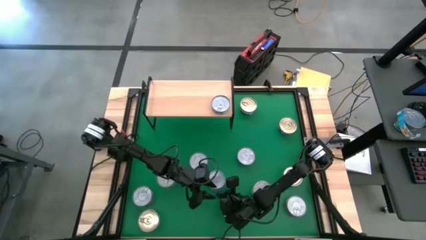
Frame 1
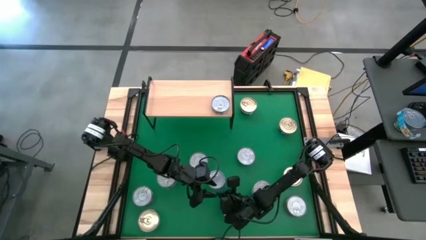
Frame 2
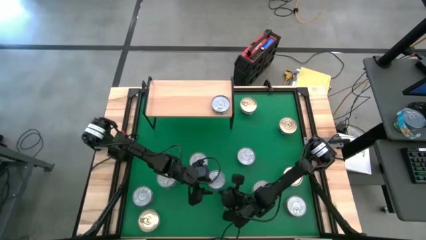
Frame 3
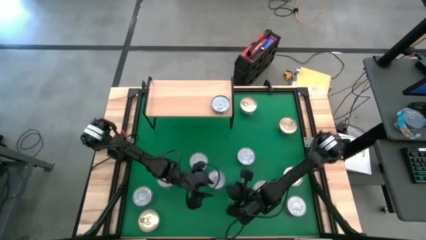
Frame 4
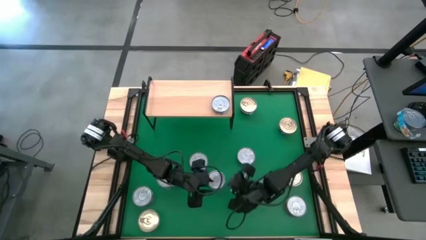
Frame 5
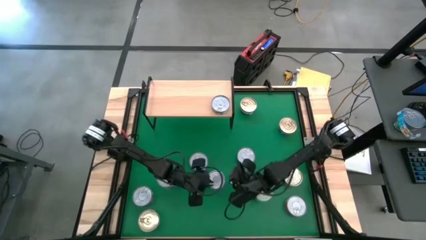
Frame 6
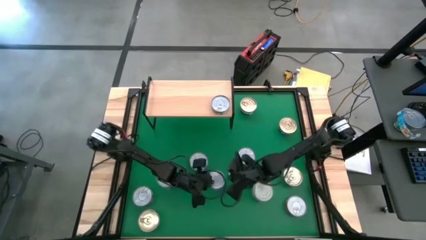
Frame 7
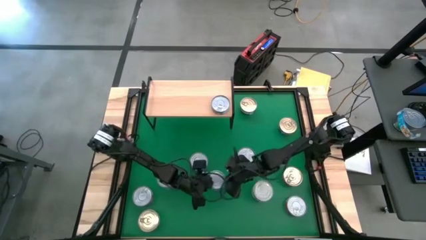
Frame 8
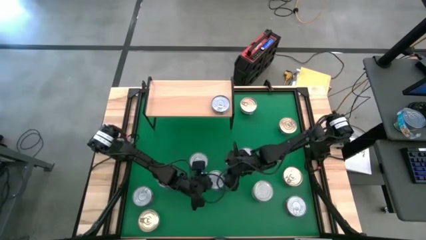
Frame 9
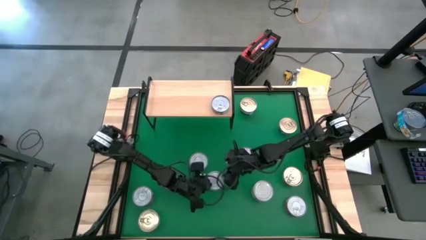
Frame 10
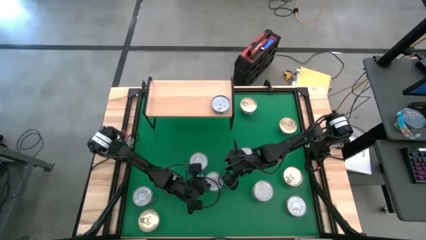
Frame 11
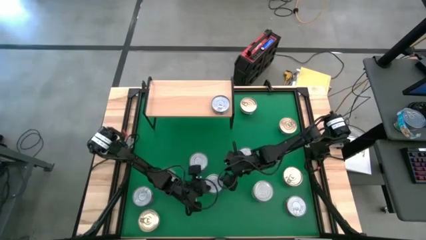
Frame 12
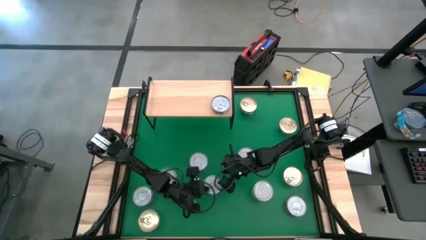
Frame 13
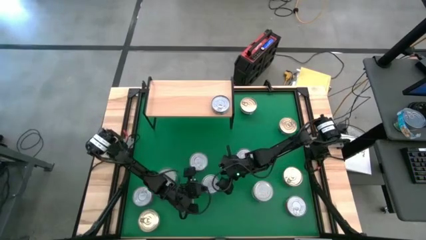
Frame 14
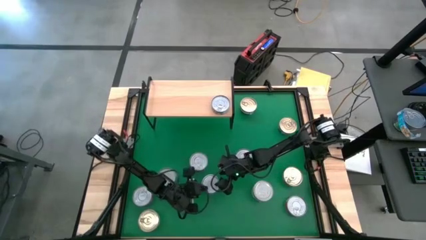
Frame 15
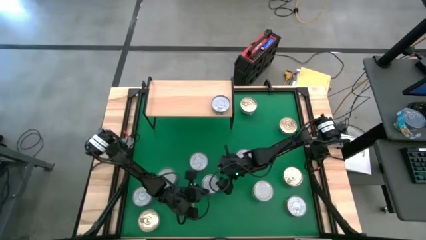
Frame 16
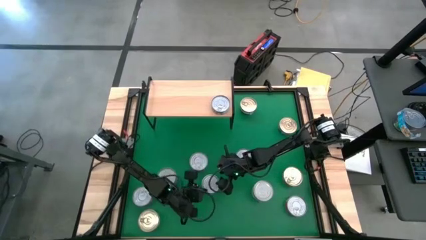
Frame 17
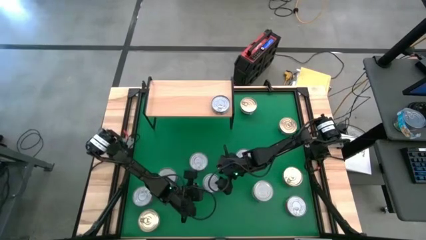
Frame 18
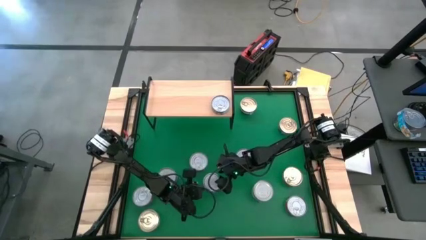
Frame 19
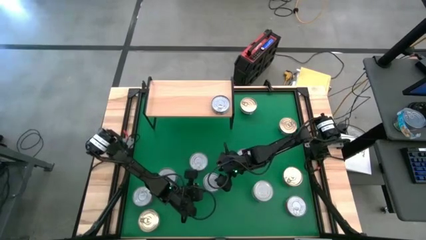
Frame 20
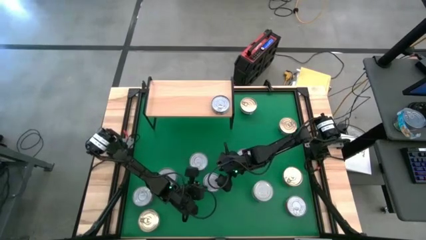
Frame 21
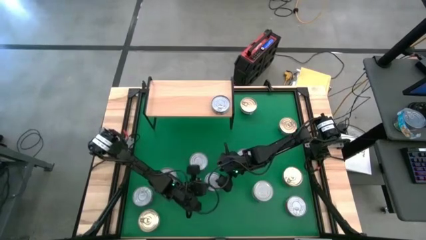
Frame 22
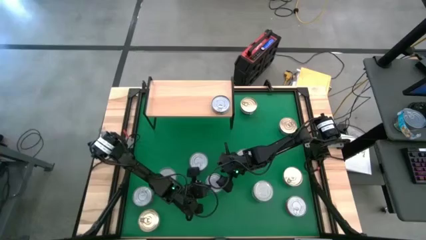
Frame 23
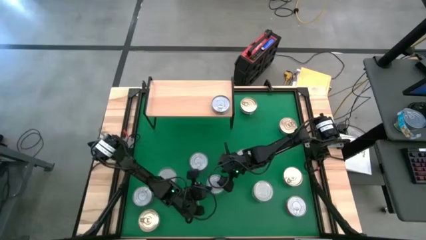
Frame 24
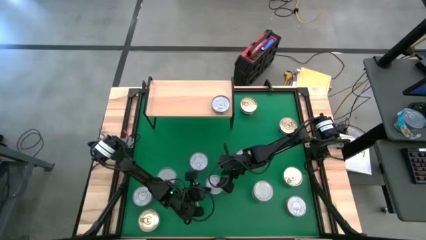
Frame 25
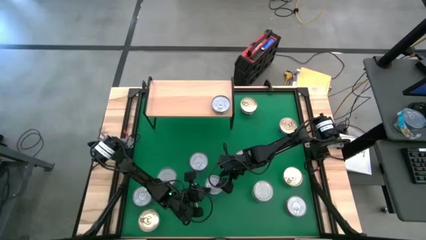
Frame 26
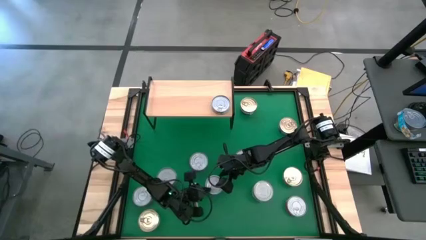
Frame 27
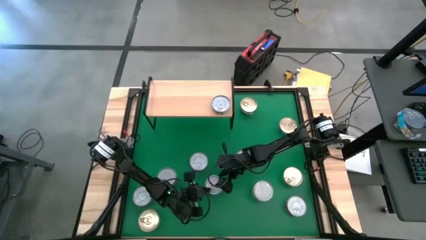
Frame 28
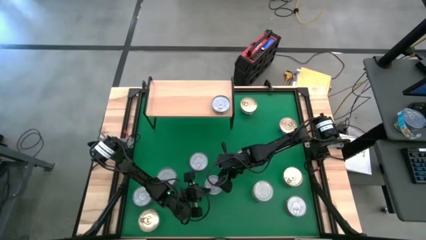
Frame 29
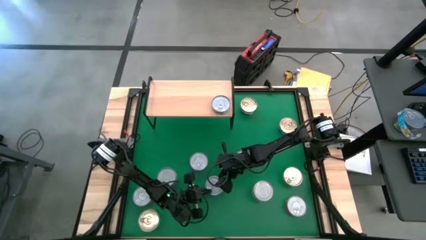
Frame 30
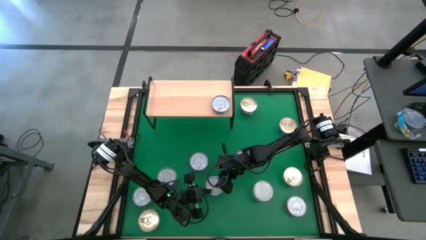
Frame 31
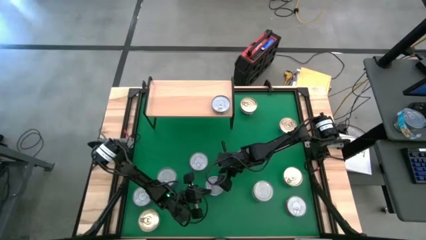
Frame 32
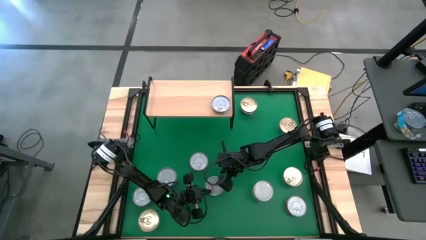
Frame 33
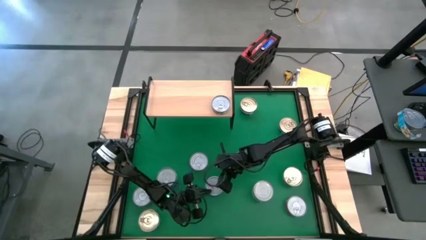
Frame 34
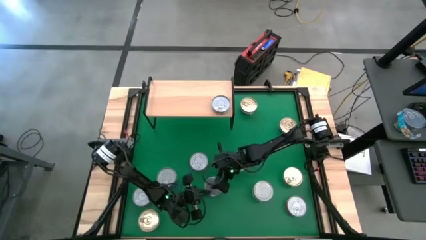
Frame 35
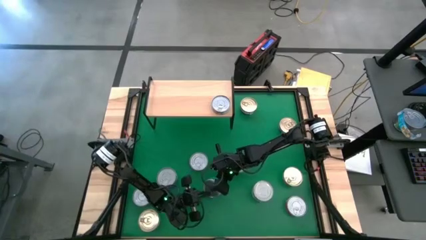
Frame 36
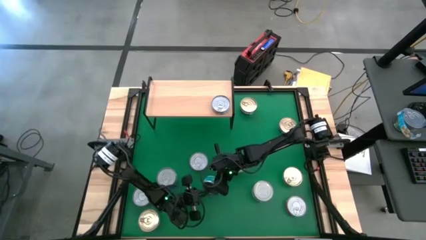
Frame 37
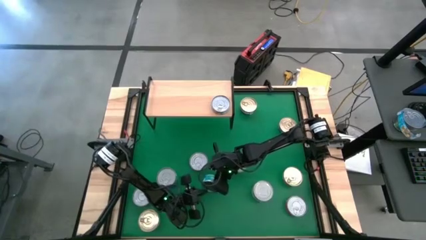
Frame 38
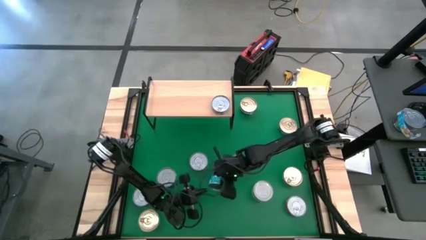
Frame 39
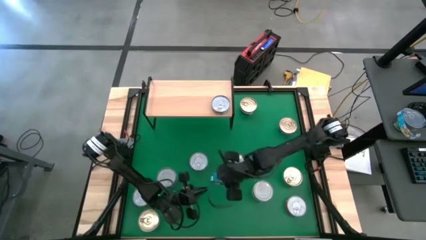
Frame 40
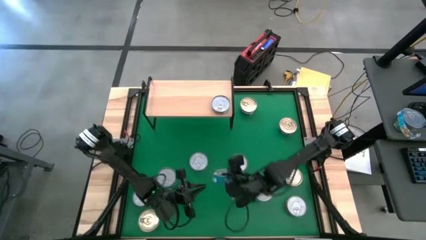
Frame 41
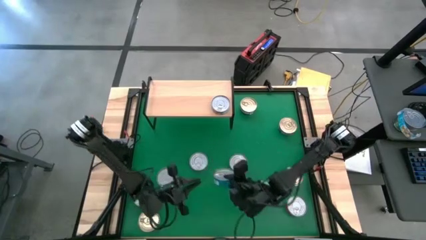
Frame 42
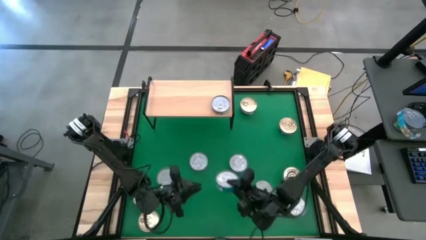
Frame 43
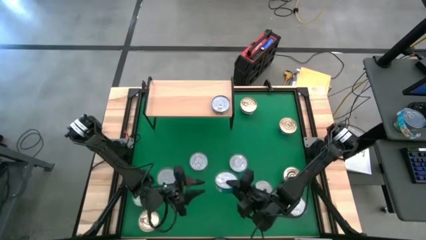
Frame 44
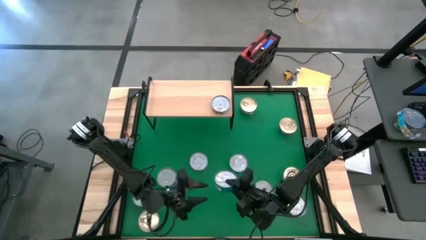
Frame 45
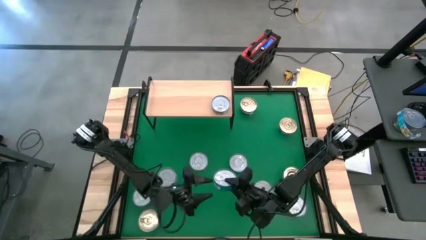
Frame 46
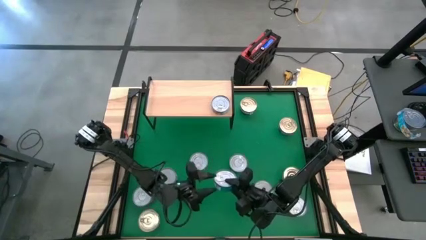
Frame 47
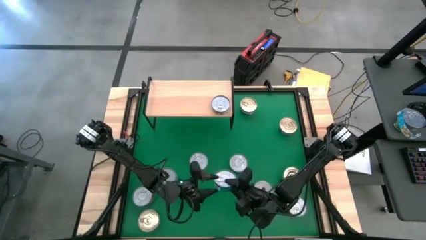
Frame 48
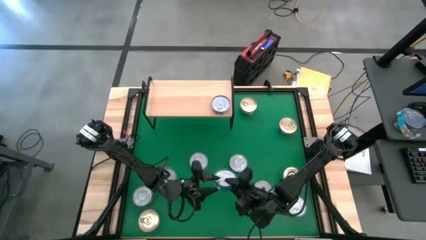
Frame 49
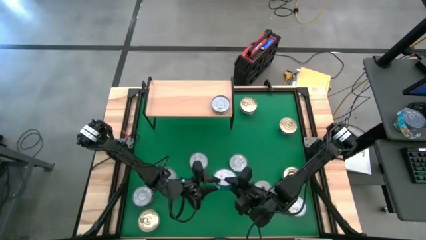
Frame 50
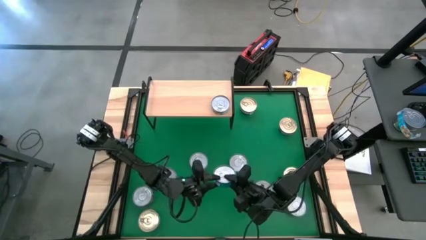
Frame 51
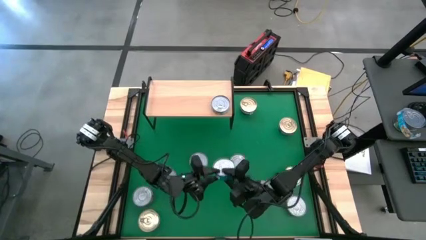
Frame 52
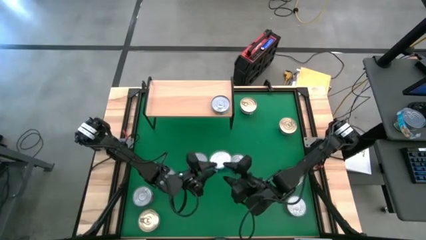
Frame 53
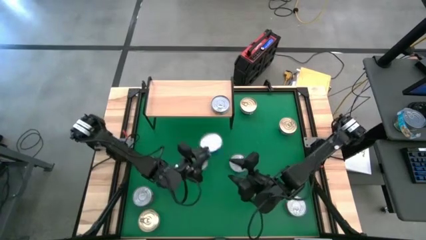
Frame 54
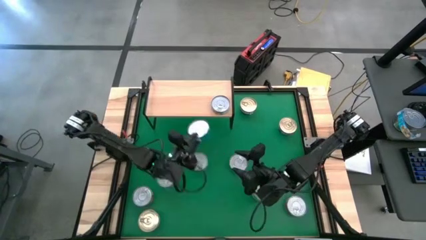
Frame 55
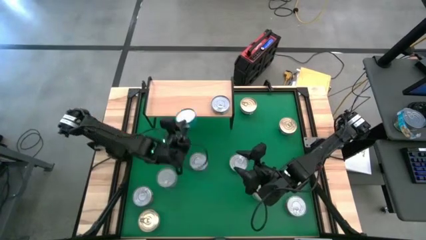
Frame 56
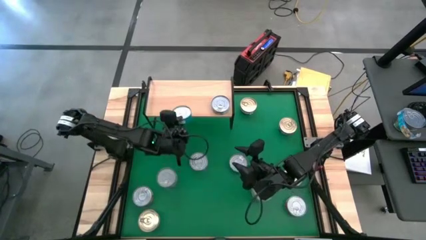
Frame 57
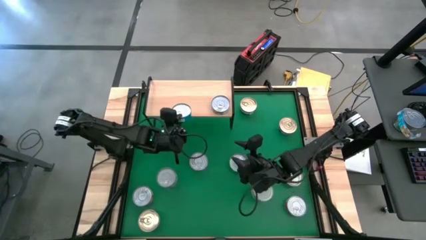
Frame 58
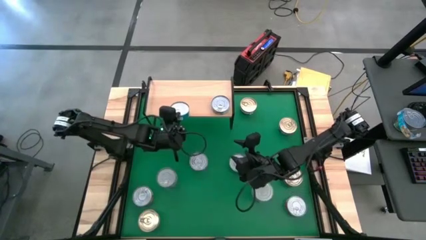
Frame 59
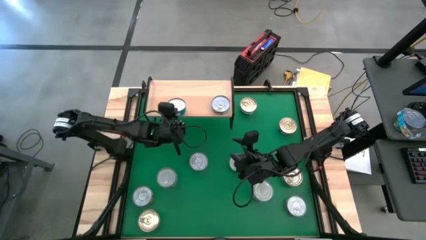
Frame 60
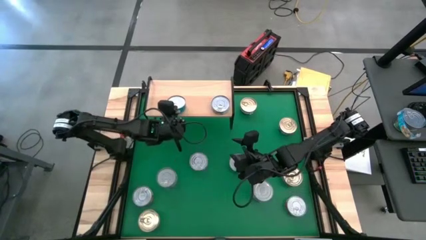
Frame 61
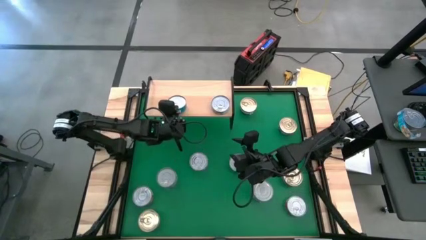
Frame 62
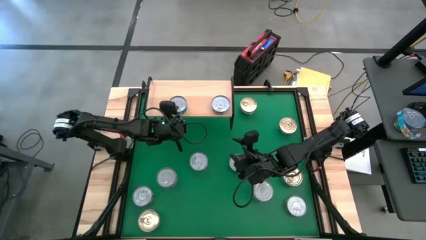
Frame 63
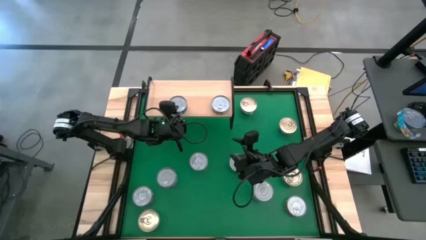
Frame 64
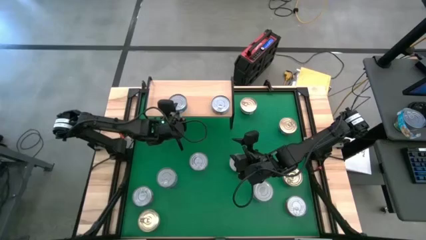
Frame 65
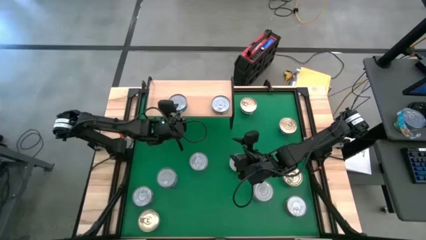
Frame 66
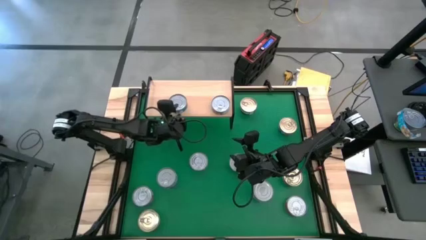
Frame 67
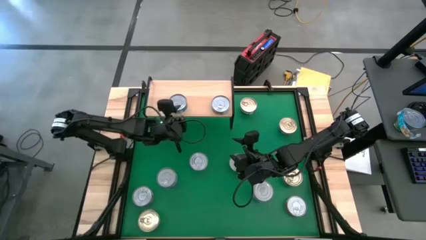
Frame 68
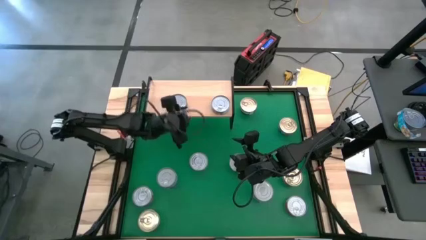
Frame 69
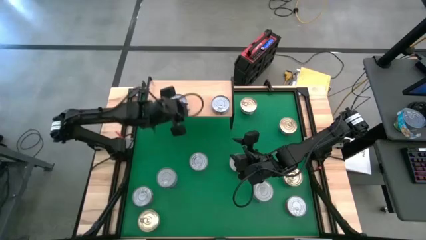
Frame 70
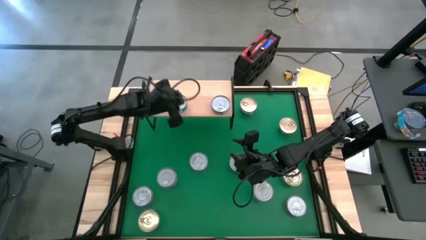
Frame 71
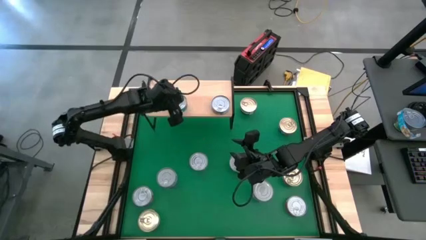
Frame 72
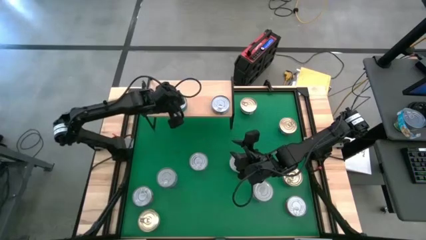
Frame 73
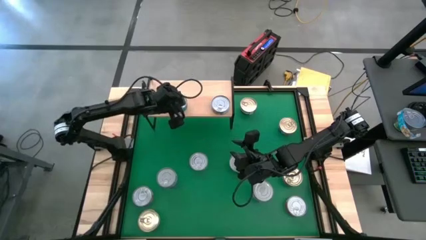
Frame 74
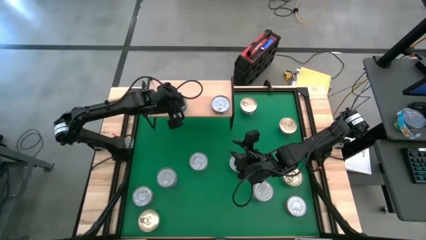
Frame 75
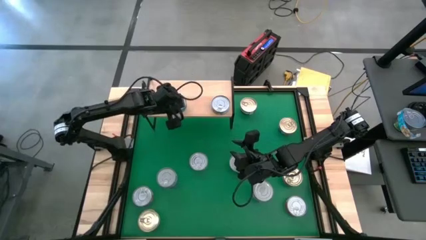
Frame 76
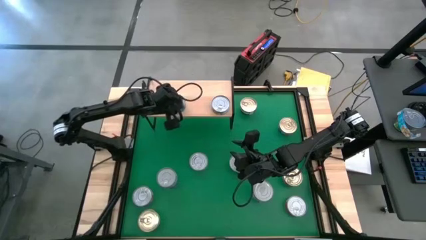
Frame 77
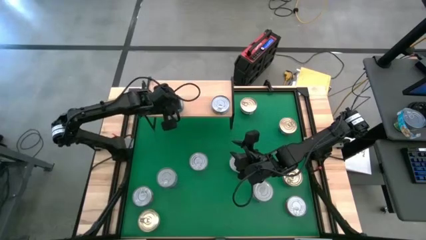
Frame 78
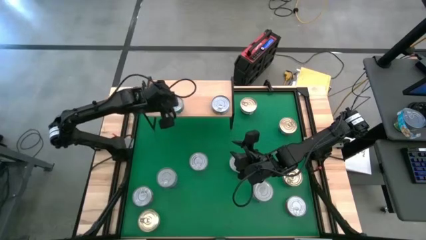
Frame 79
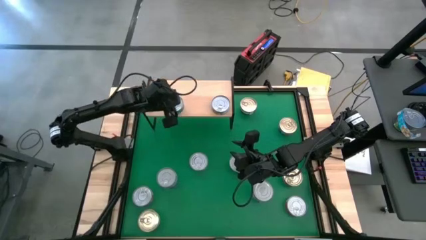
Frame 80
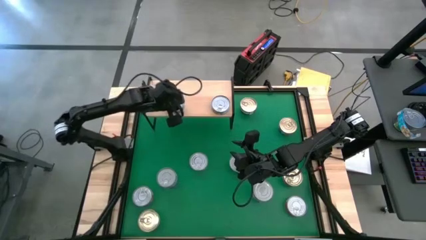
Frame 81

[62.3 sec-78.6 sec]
Task: Stack canned seafood by type on shelf
Put the center light blue tuna can on the shelf
